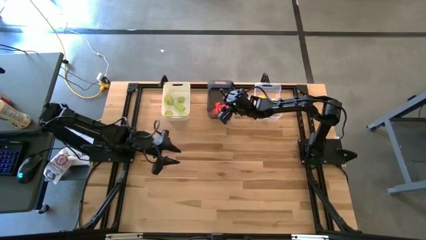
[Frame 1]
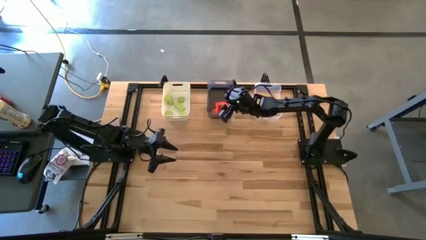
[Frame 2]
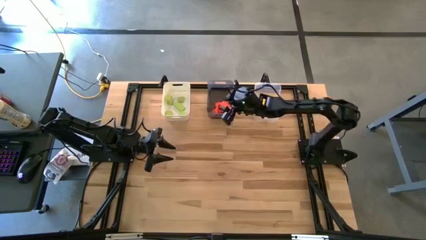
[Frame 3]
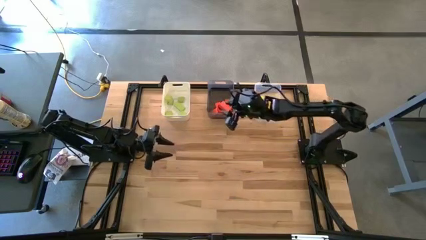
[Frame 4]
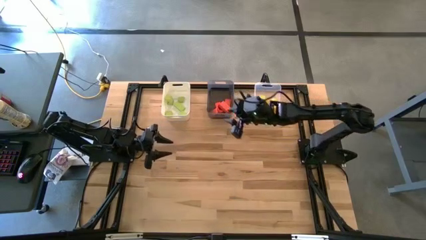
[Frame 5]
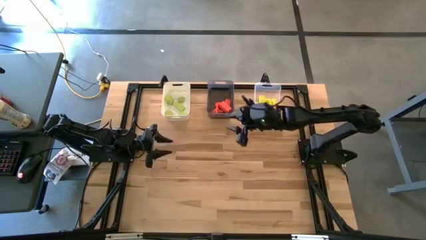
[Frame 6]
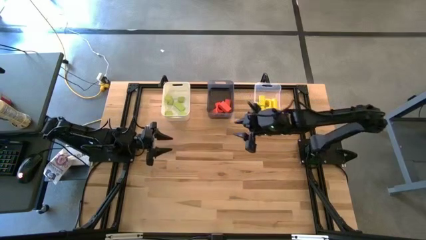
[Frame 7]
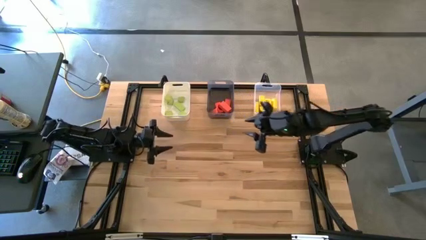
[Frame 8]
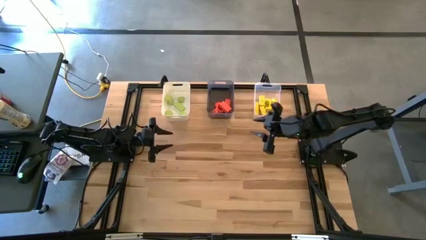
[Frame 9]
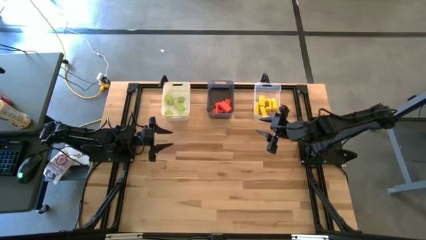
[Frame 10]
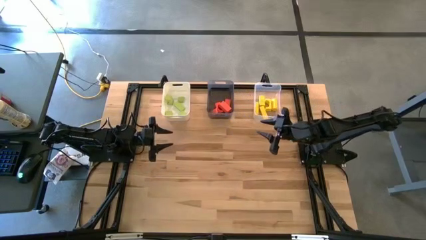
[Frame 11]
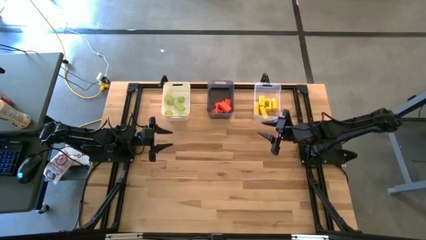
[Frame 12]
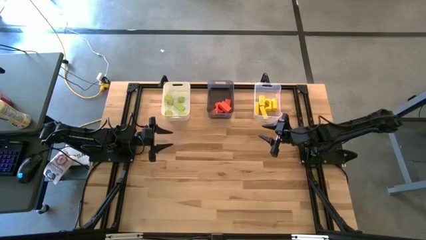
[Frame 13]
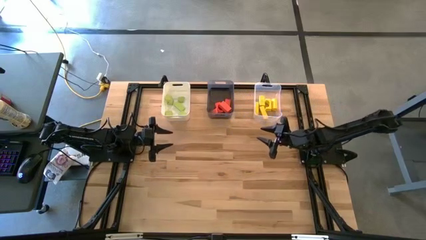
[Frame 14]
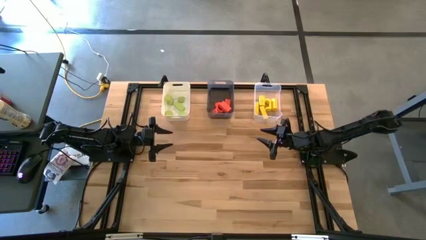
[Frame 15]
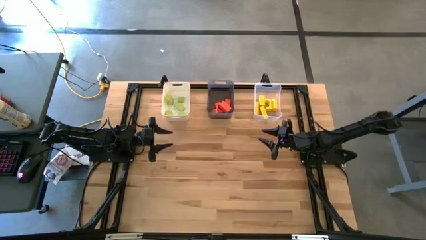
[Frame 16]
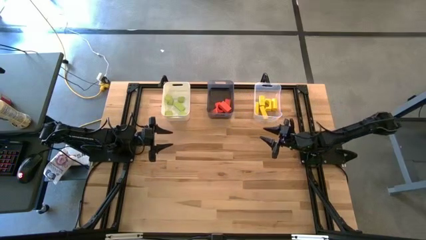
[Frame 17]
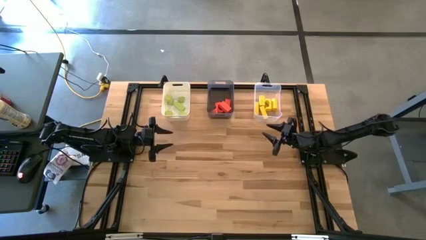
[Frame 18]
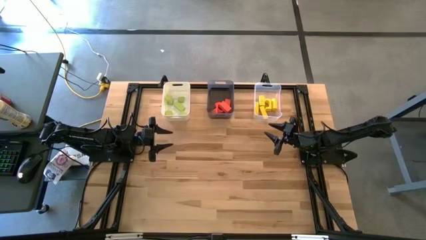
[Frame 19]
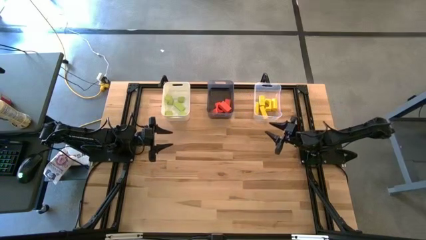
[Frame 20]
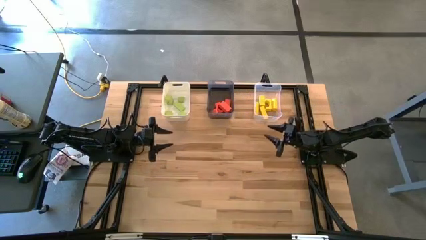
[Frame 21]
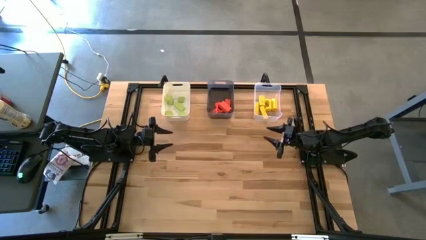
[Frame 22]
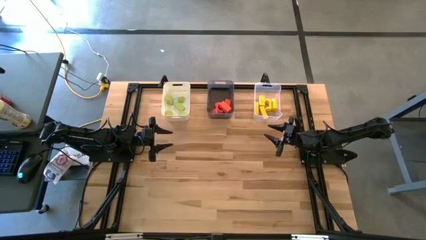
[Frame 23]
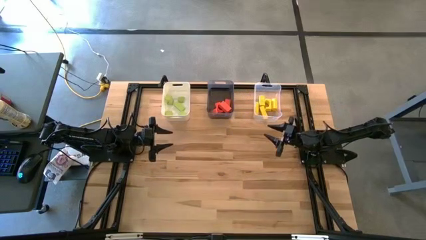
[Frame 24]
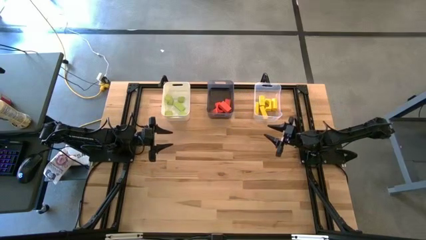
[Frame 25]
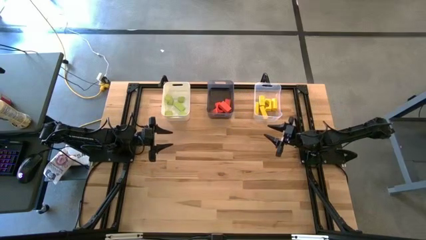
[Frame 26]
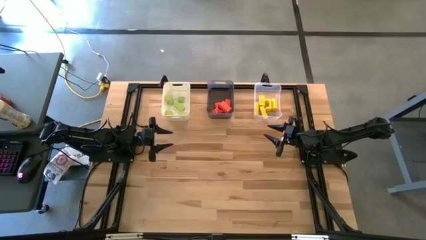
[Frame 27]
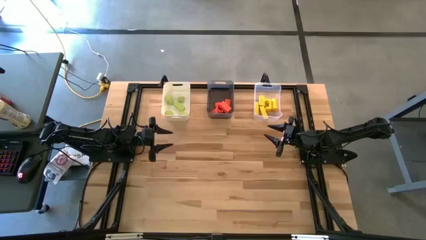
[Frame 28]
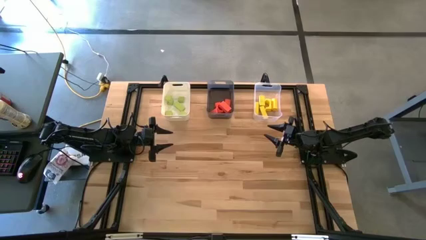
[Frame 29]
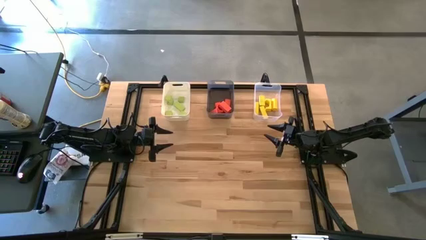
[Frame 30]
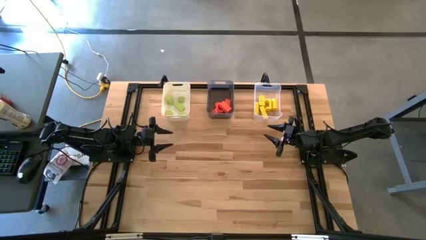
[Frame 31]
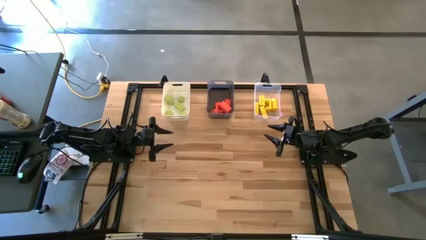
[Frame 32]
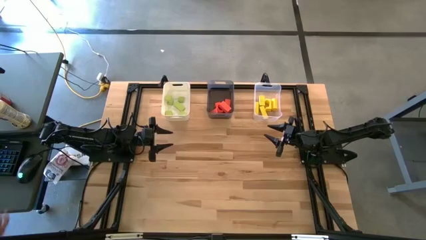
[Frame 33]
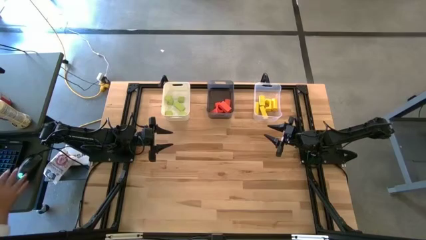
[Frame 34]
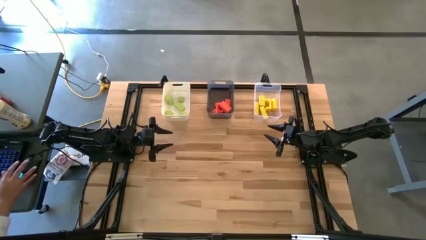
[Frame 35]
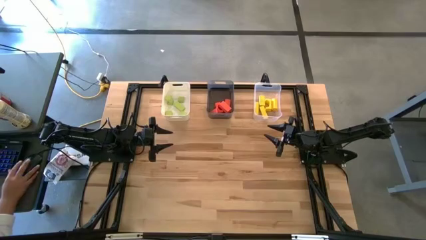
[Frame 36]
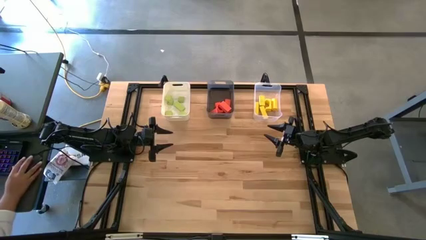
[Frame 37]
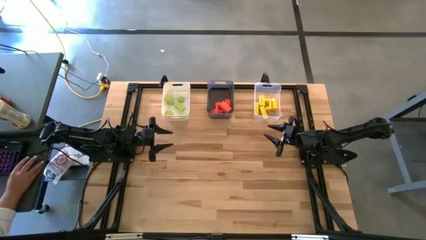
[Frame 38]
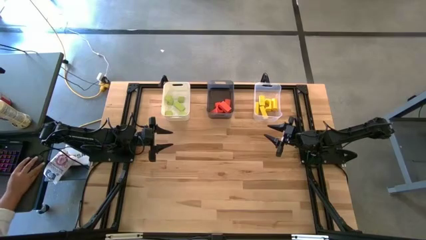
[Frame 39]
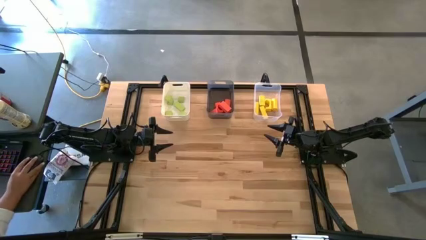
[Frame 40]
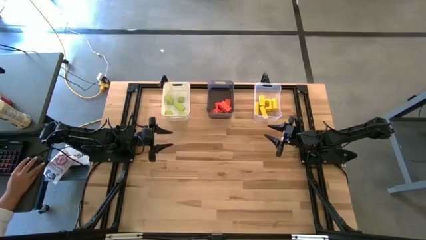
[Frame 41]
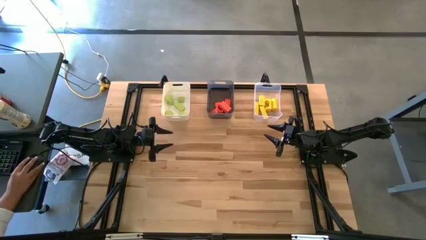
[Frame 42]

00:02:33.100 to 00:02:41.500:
Task: Sort & place blocks by color
Return to Home Position

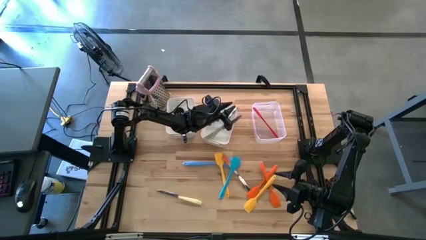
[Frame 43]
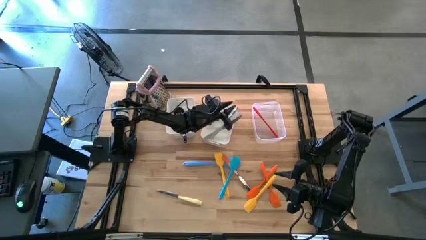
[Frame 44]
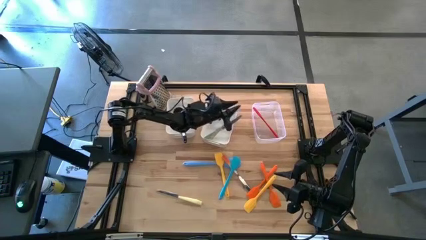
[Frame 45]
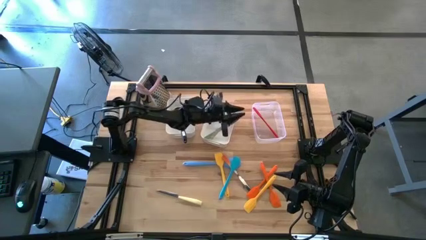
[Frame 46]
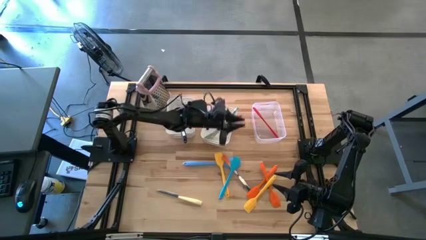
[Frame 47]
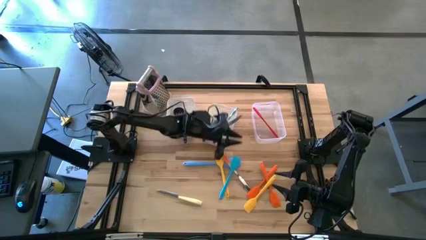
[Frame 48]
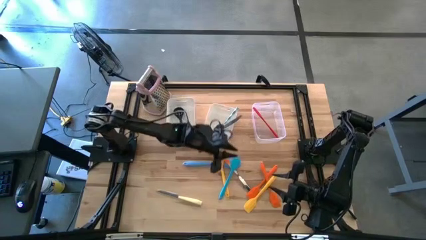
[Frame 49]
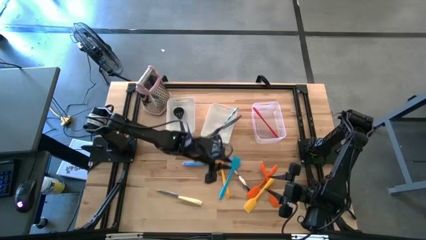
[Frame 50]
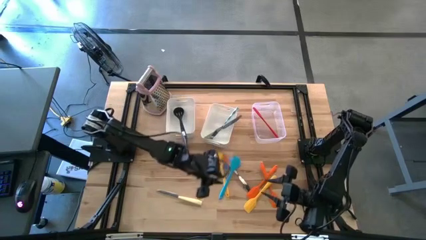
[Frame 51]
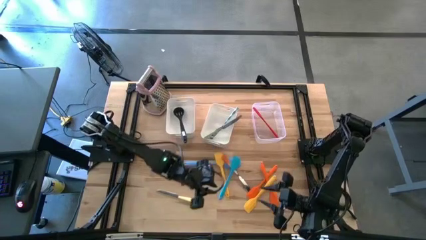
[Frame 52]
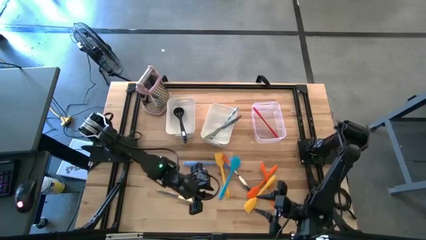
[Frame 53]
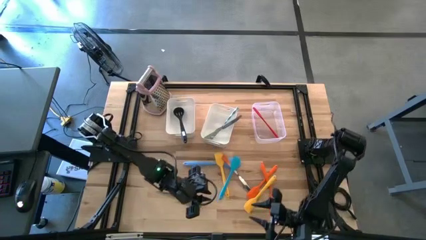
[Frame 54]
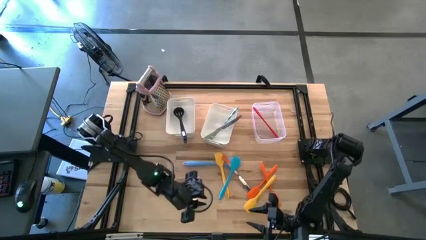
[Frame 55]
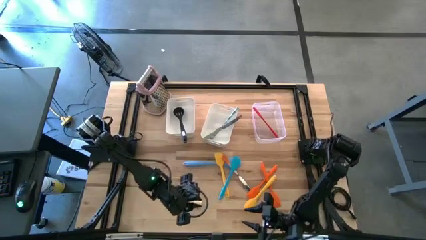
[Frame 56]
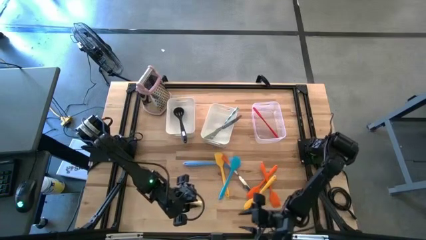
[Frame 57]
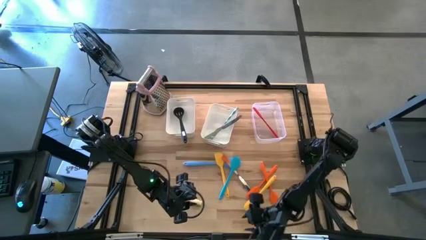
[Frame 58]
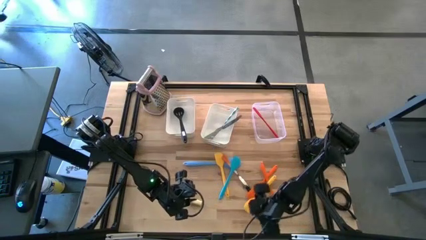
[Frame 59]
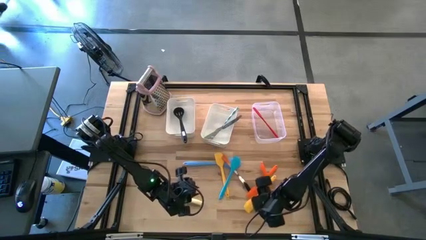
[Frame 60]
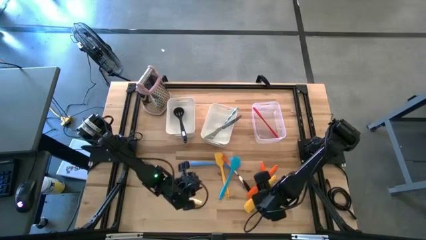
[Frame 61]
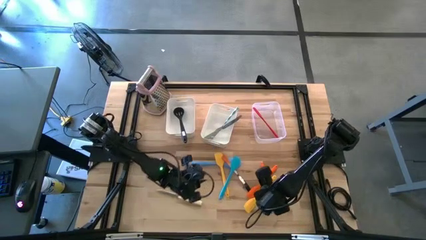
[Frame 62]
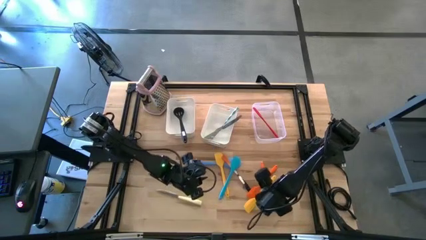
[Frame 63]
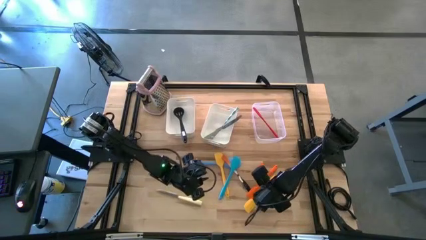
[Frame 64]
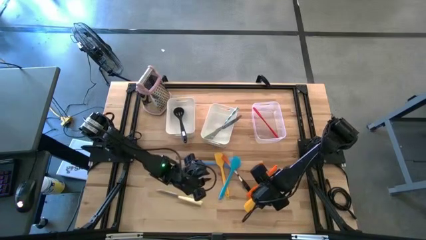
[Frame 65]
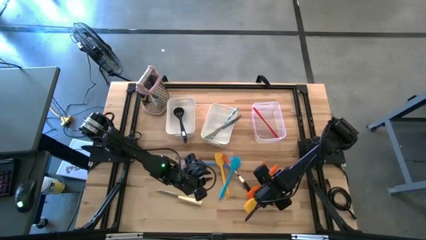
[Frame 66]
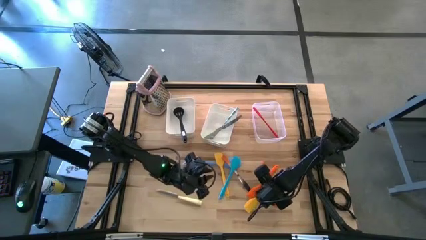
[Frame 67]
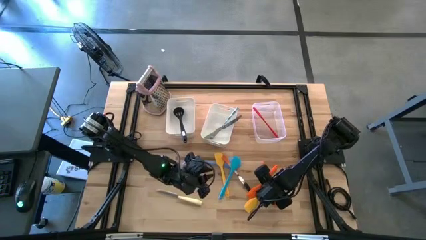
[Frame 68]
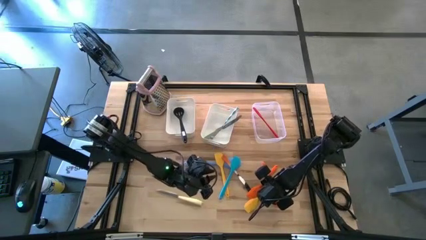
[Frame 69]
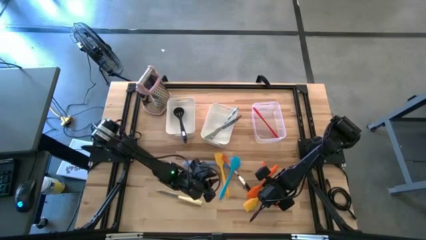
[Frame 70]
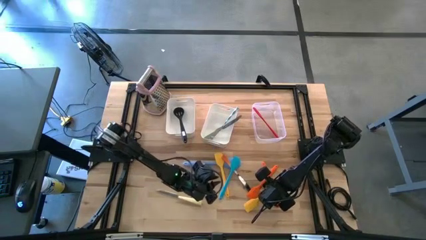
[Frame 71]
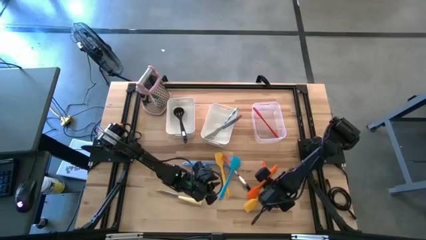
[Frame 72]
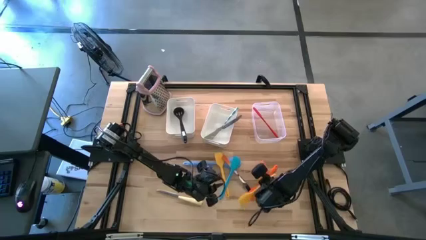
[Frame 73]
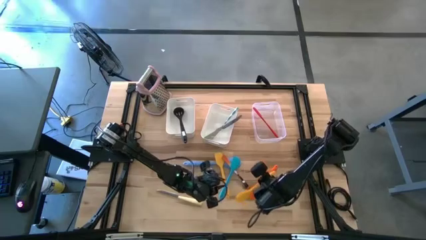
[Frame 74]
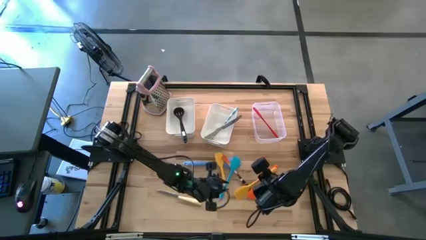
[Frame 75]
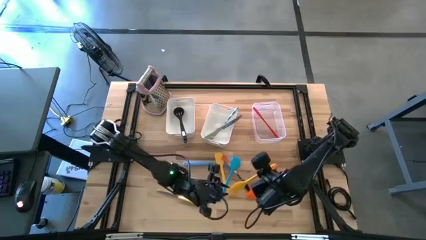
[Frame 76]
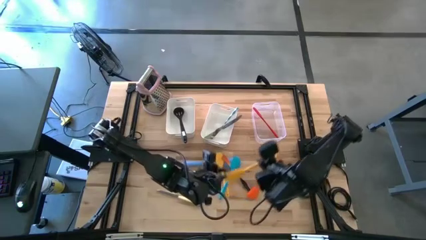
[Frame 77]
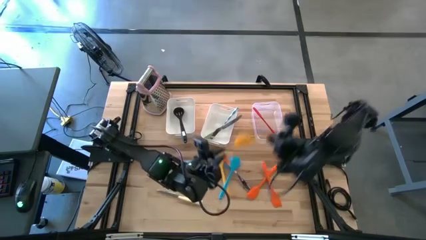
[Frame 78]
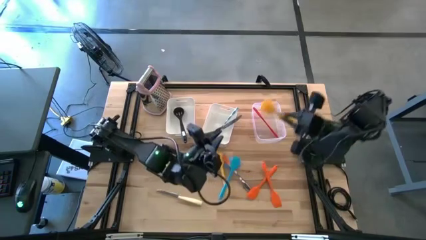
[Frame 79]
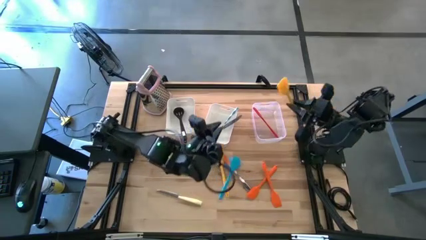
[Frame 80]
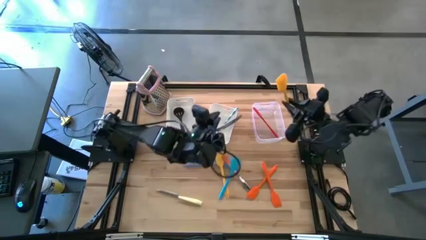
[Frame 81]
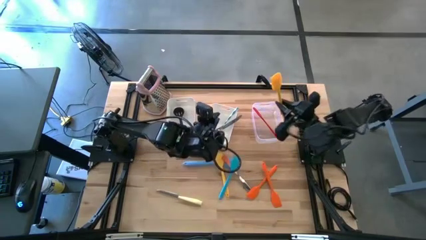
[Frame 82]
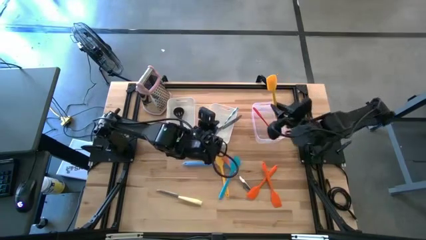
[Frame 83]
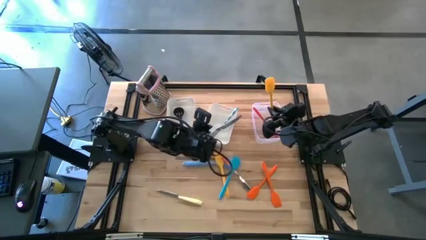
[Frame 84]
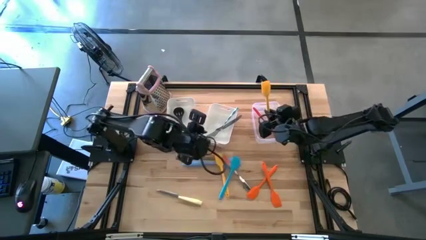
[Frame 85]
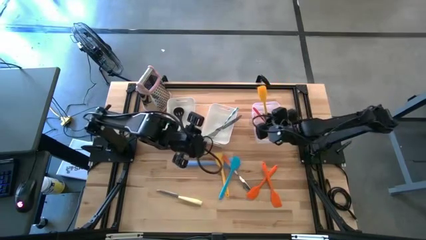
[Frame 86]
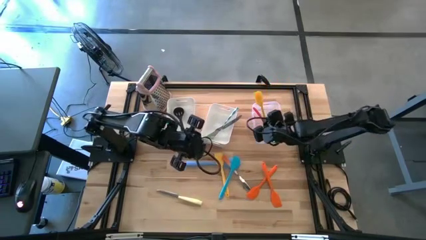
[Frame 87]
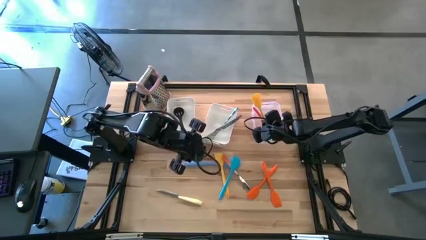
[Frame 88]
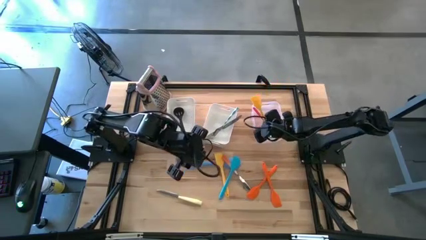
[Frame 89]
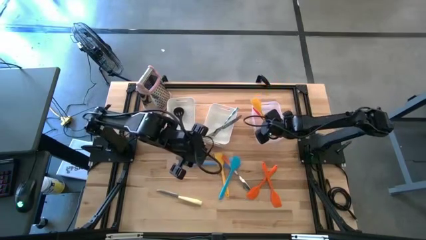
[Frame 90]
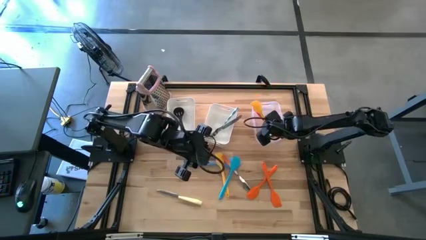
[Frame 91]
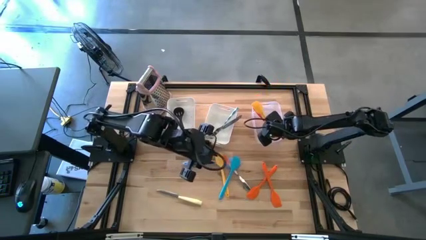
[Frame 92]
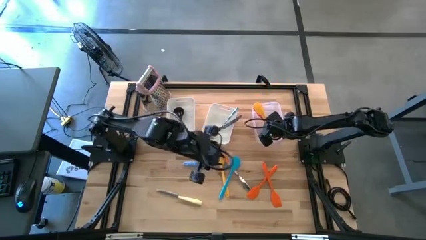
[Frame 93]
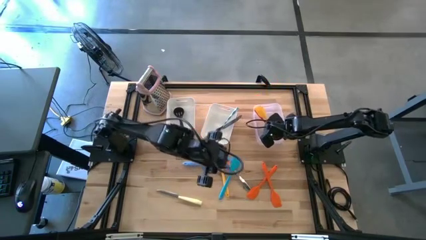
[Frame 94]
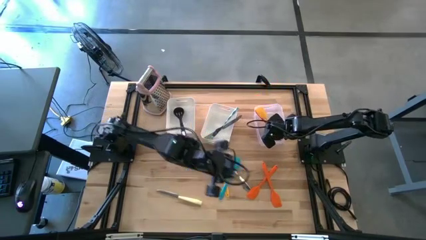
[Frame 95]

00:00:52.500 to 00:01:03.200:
Task: Pick & Place Kitchen Items
Put the bottom yellow spatula into the transparent bin
